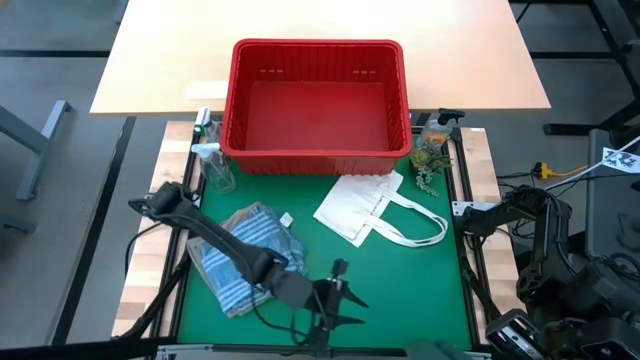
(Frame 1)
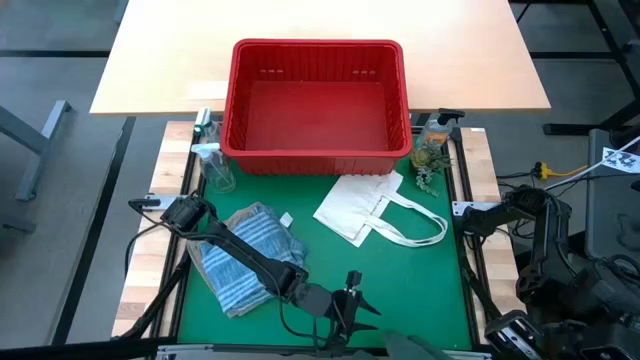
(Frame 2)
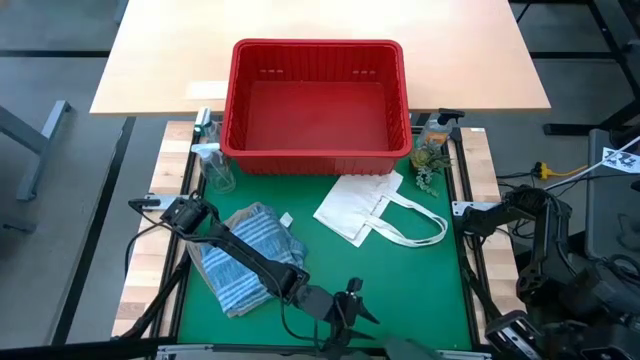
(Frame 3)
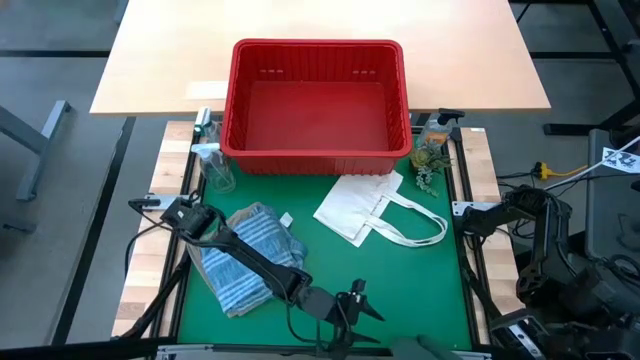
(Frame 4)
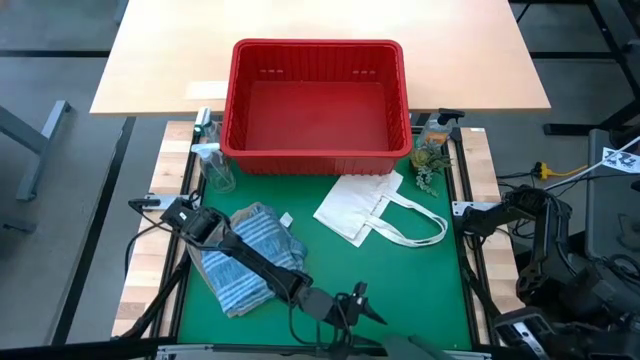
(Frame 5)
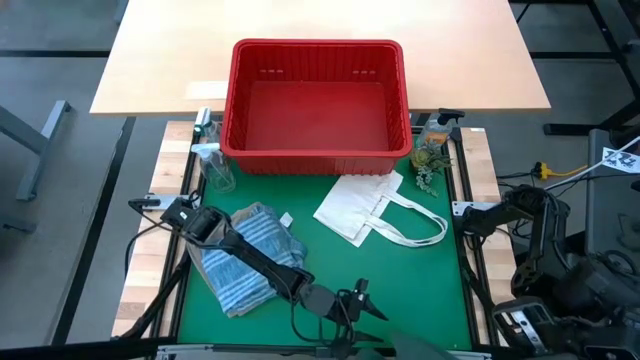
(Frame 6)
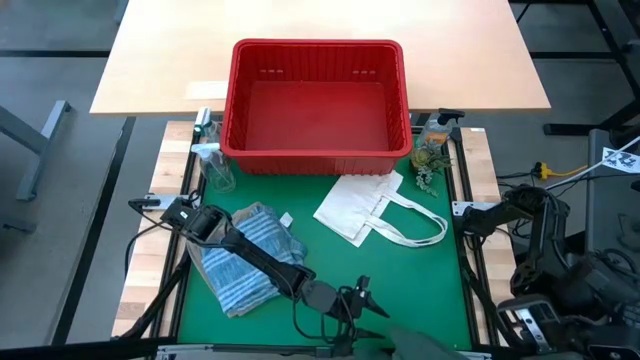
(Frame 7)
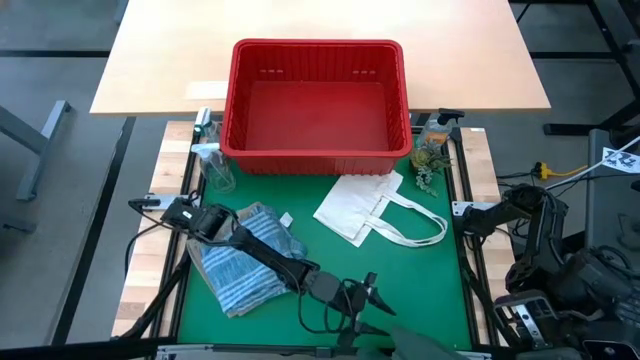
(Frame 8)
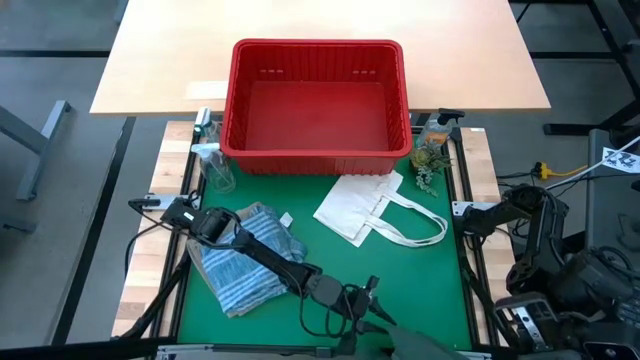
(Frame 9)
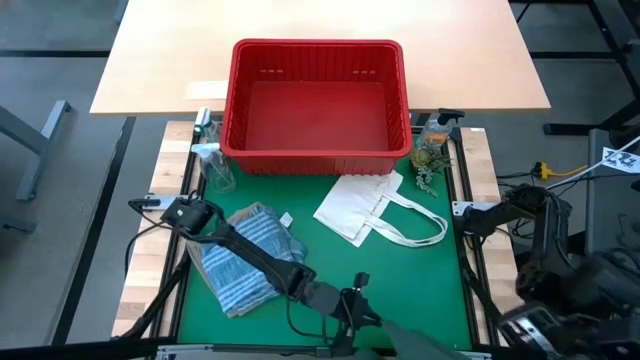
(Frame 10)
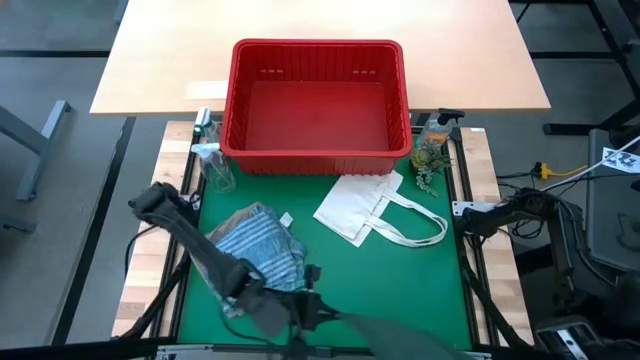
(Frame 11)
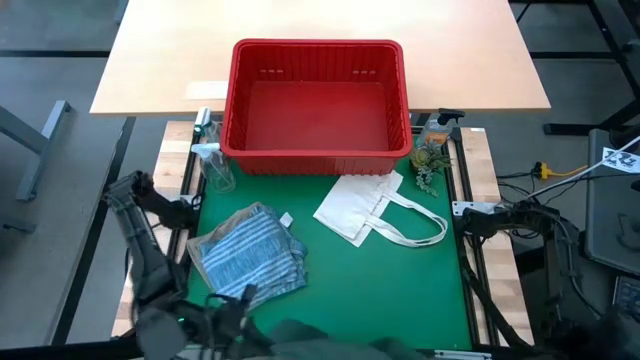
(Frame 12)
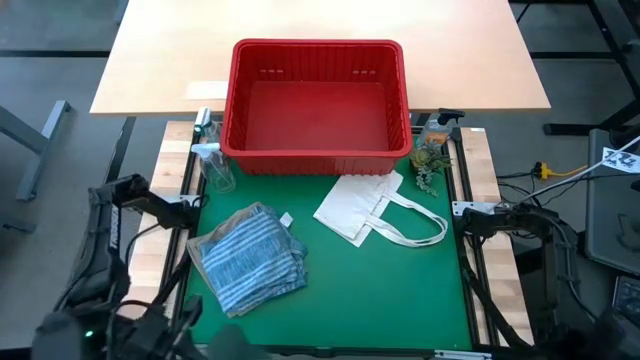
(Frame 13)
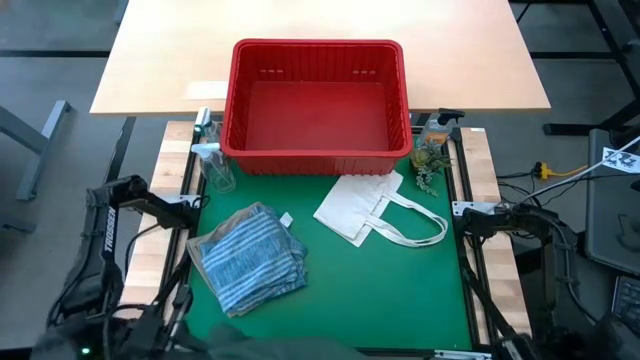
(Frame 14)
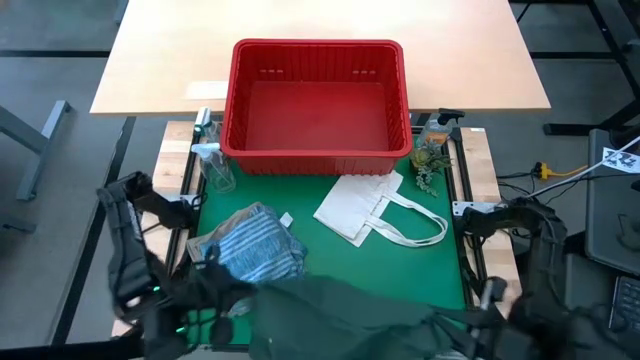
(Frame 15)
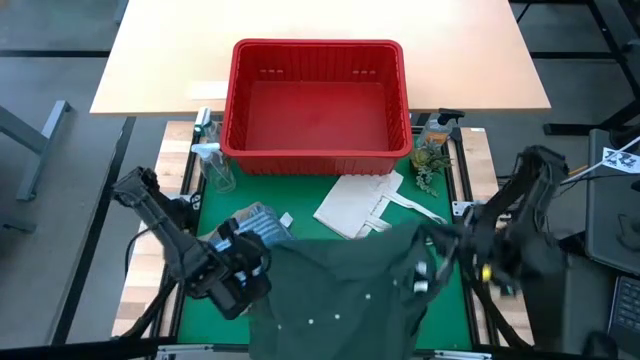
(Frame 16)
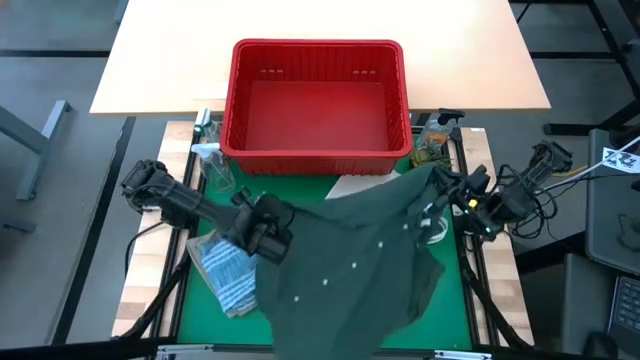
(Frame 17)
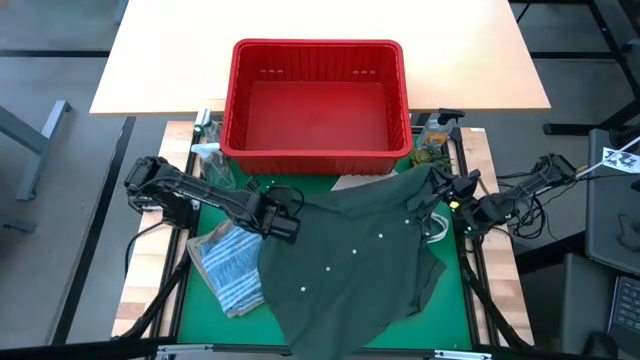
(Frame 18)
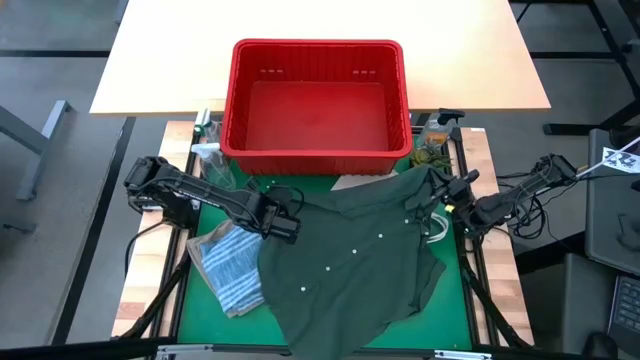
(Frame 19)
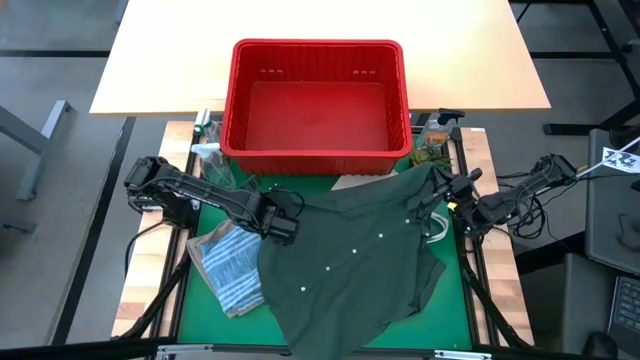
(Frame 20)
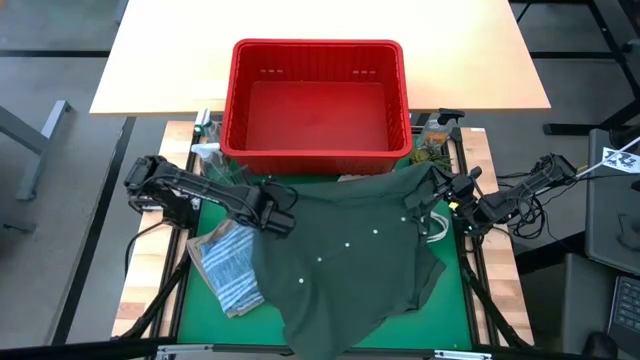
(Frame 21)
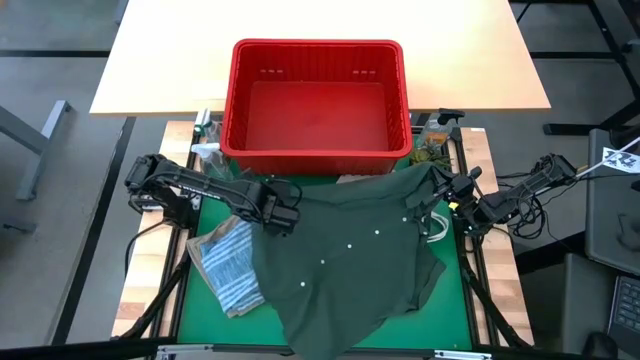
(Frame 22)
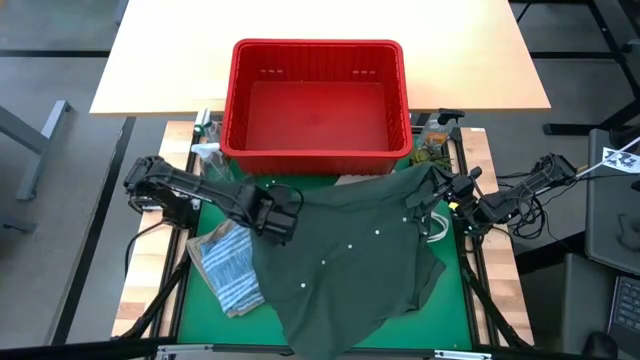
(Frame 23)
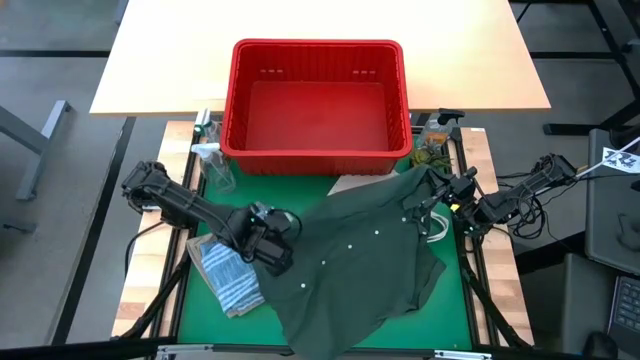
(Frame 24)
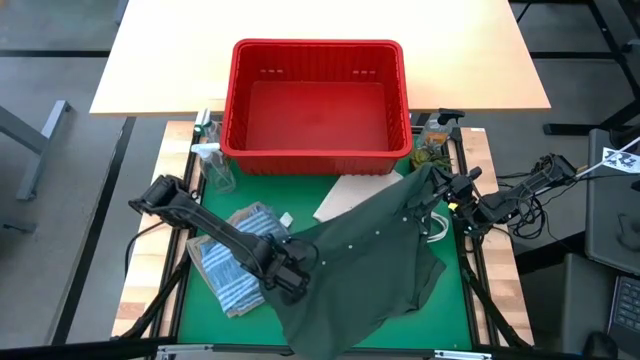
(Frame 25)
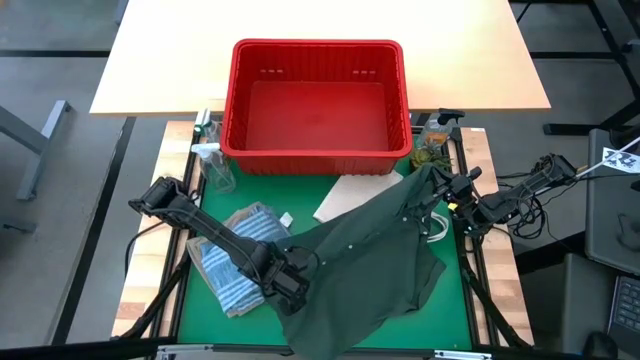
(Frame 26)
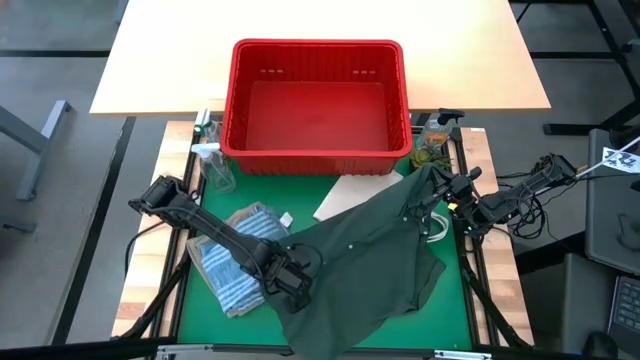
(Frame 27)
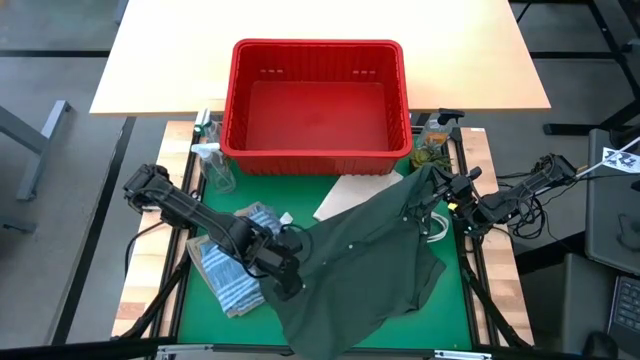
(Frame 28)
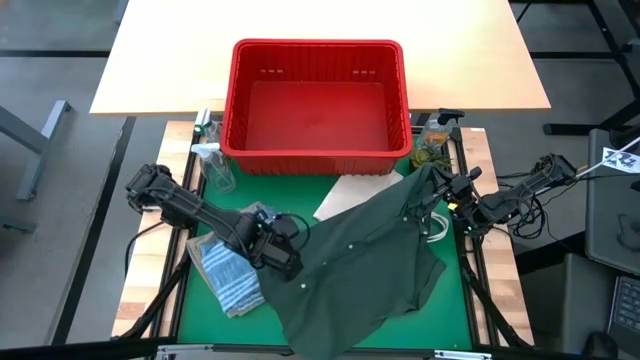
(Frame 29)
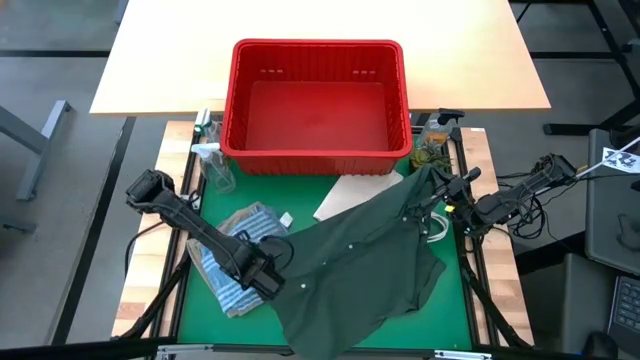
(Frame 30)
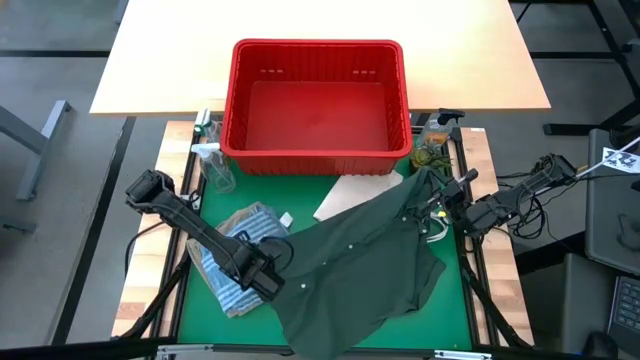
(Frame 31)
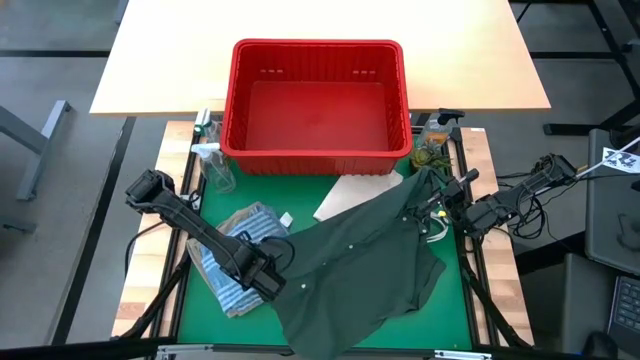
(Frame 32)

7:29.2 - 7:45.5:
Task: Fold Laundry from Bin
Remove the green polo shirt from the red bin
